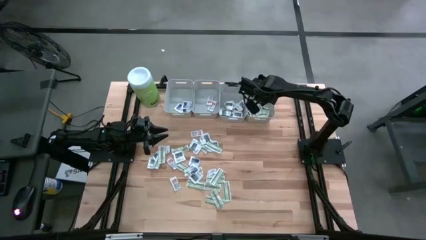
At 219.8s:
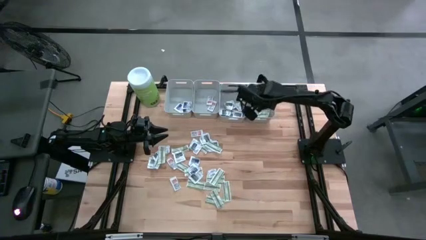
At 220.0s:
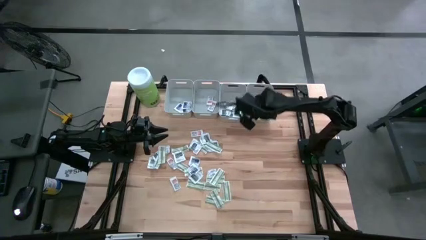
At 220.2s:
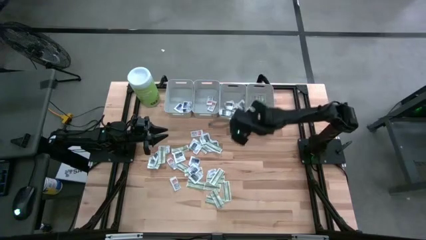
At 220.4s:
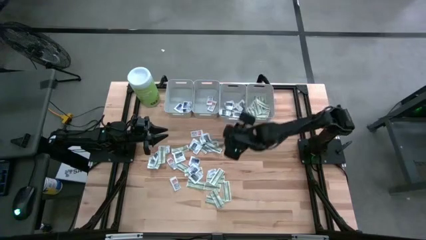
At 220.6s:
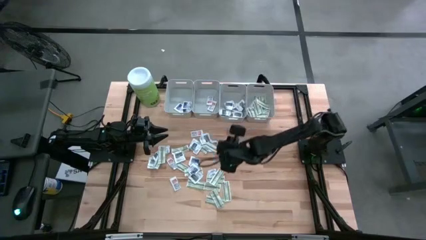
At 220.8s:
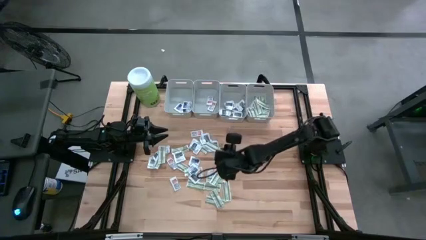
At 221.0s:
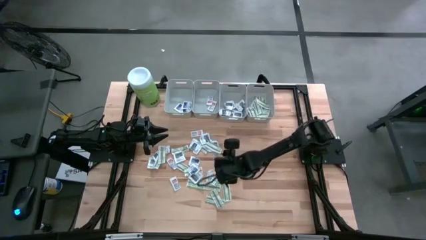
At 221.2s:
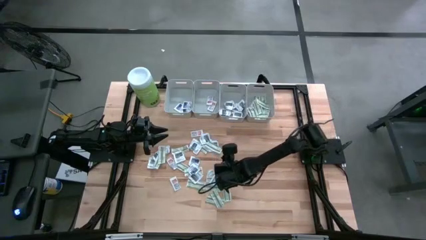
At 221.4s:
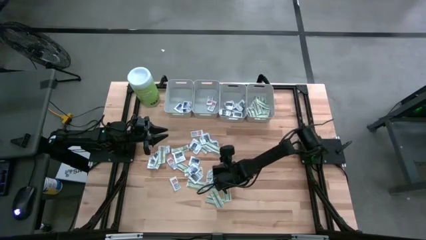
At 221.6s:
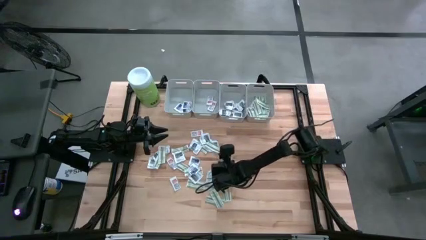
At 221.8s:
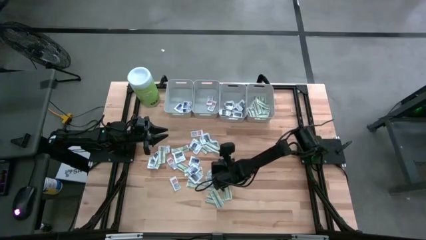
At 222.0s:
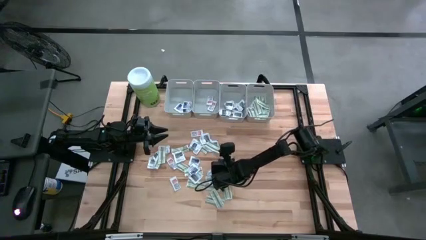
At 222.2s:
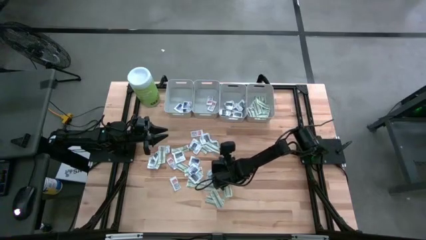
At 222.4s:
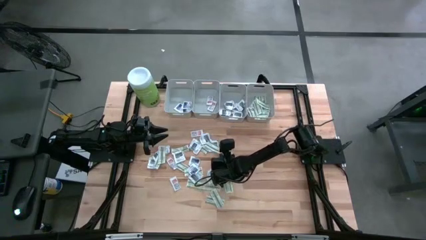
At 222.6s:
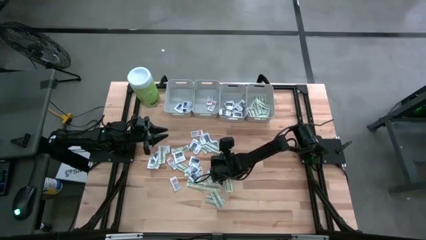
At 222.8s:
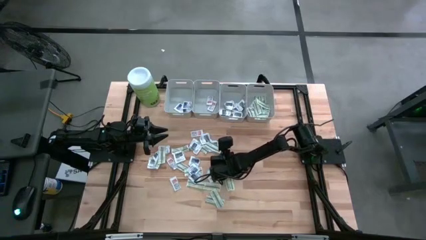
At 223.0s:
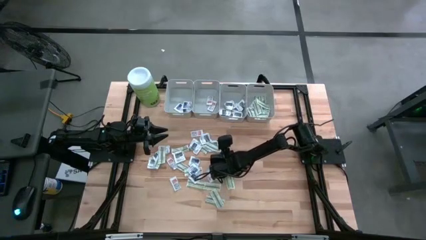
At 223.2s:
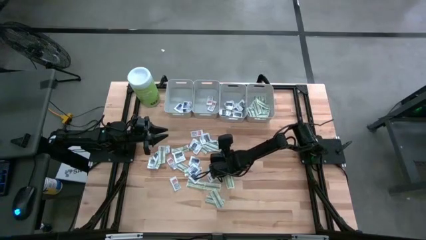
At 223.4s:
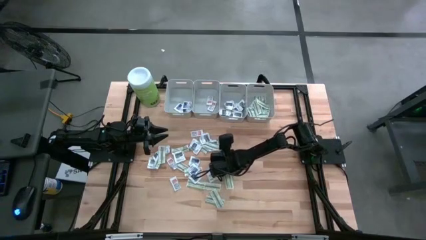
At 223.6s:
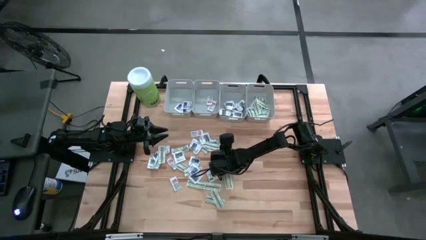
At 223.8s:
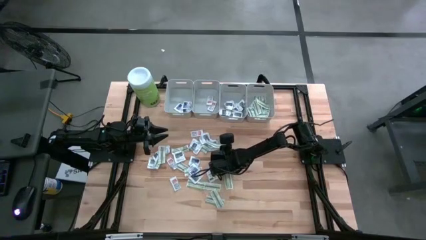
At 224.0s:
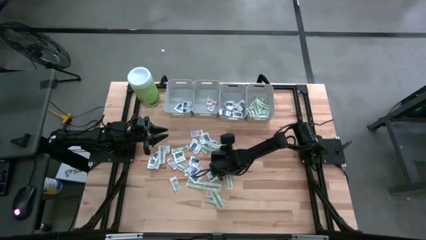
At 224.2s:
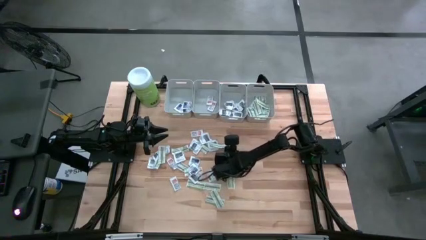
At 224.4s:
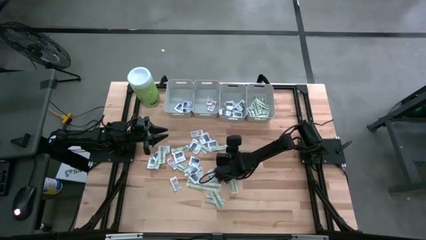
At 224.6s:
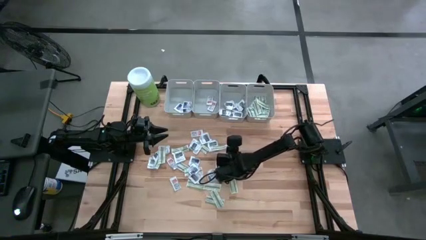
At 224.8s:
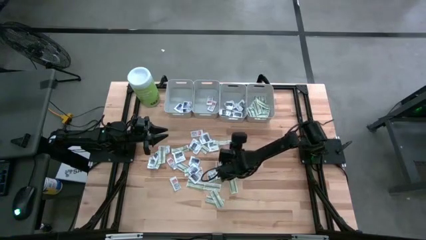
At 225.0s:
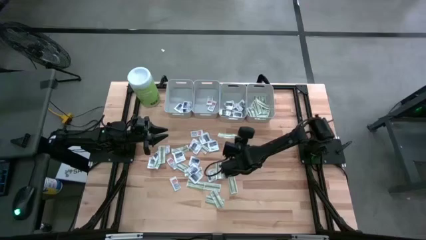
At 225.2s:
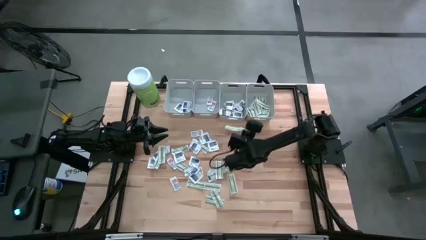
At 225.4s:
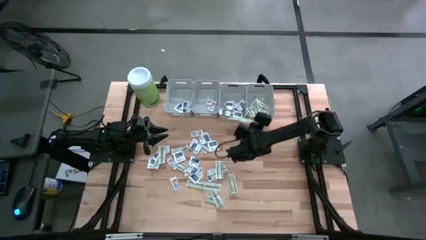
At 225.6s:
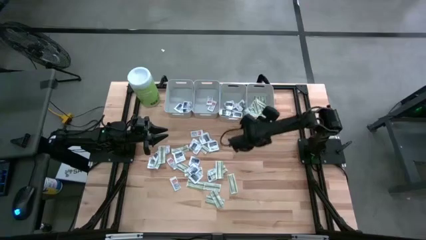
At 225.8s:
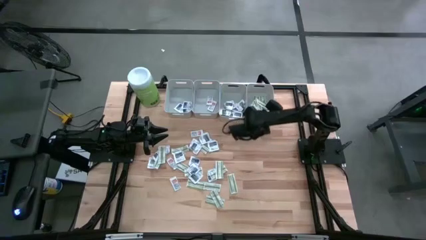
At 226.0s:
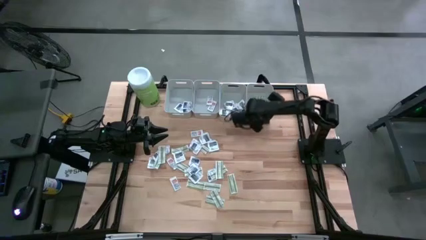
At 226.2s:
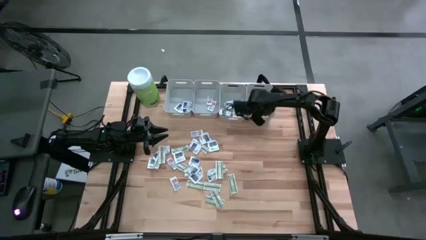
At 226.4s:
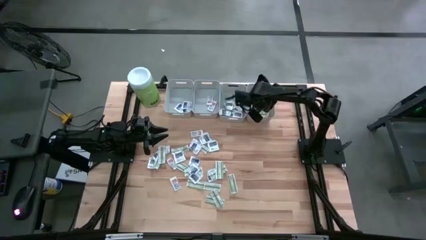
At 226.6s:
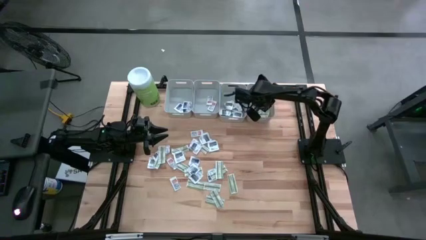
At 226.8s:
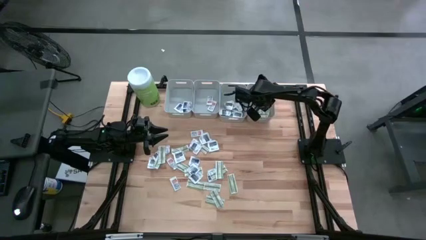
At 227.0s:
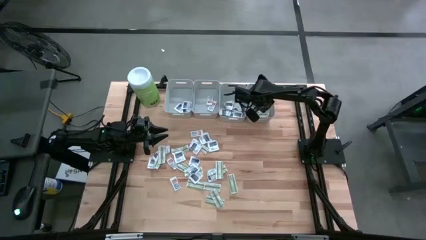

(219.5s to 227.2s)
Task: Pick & Place First Aid Supplies
Put the bandage into the right gray bin

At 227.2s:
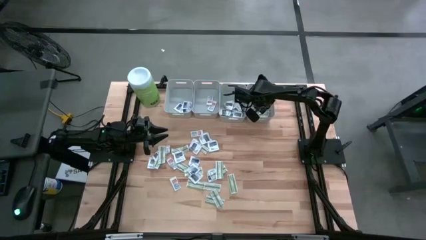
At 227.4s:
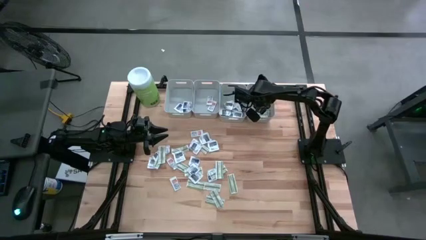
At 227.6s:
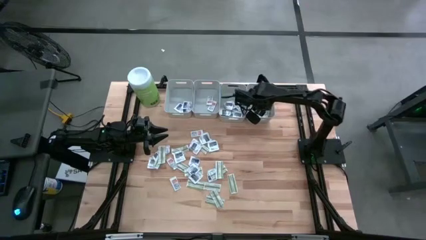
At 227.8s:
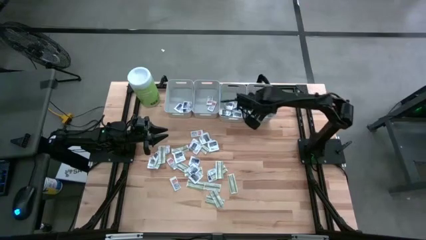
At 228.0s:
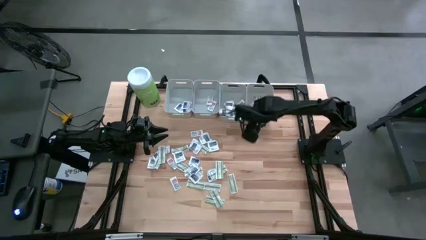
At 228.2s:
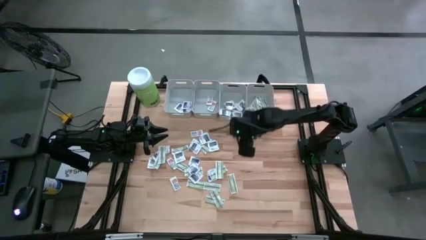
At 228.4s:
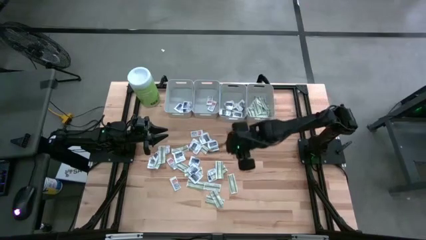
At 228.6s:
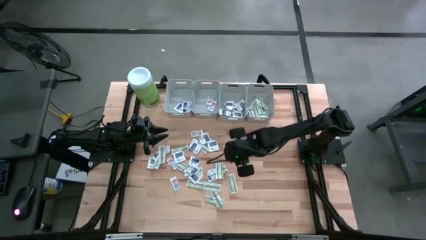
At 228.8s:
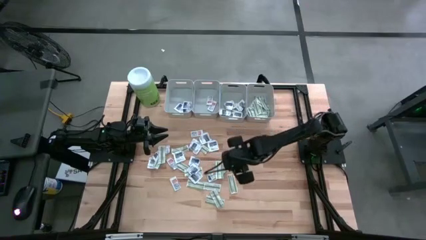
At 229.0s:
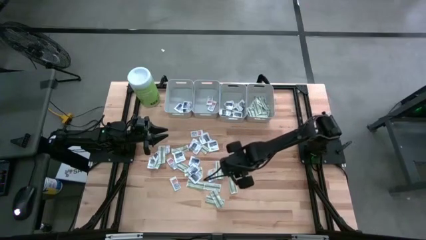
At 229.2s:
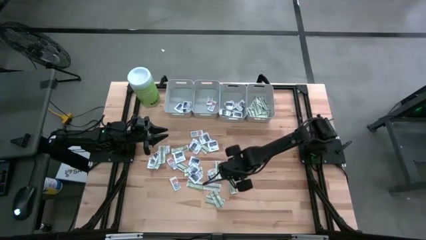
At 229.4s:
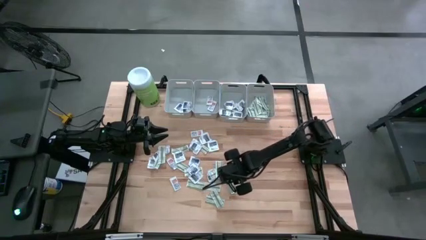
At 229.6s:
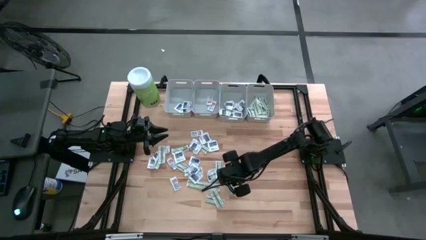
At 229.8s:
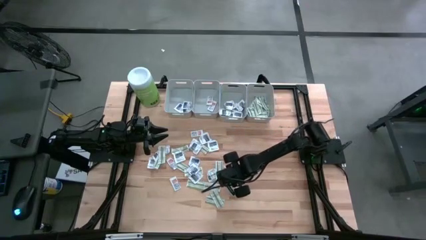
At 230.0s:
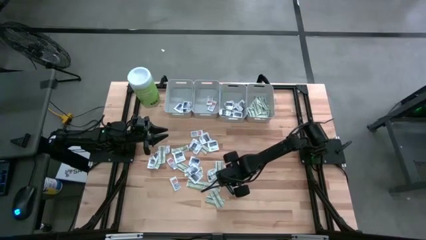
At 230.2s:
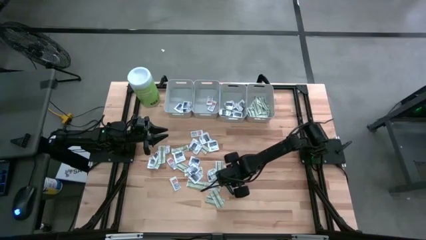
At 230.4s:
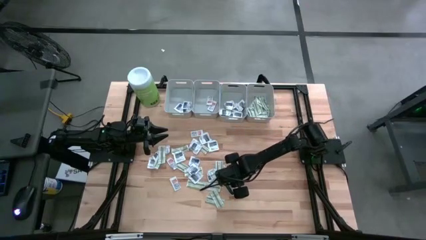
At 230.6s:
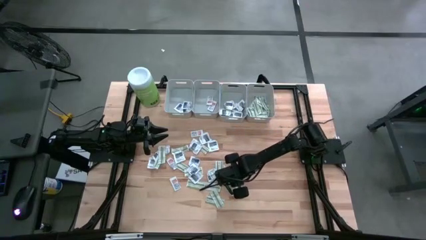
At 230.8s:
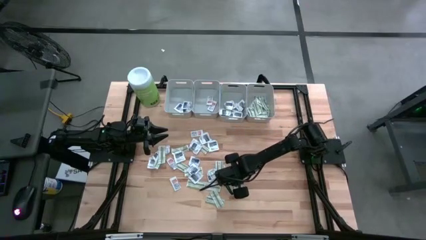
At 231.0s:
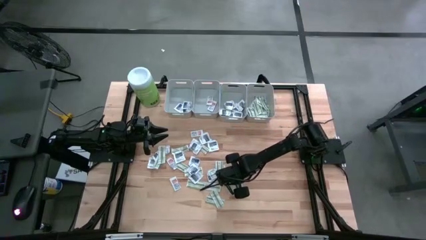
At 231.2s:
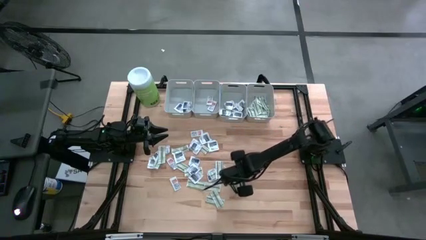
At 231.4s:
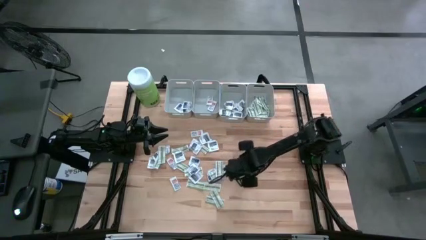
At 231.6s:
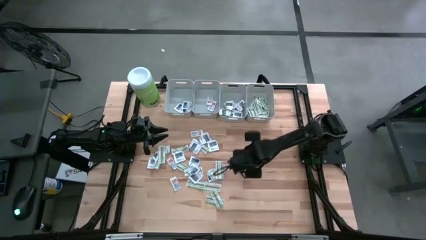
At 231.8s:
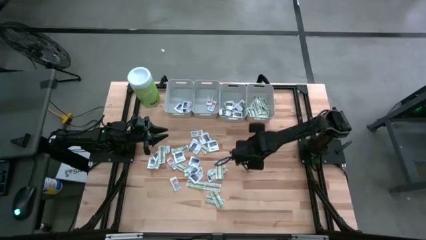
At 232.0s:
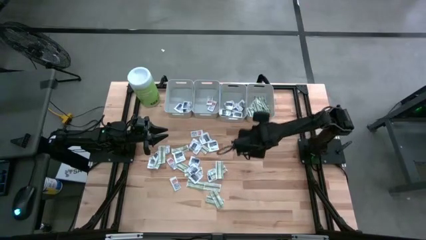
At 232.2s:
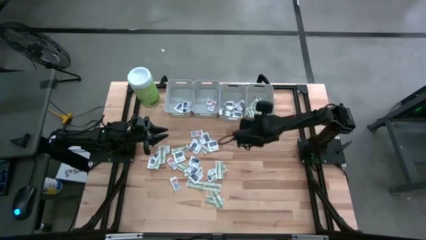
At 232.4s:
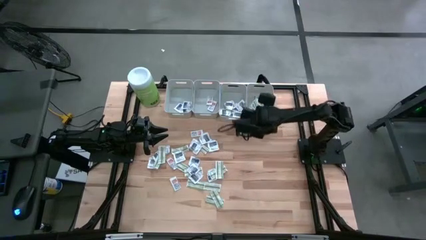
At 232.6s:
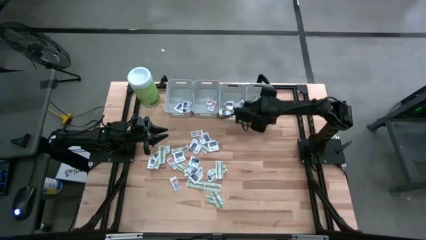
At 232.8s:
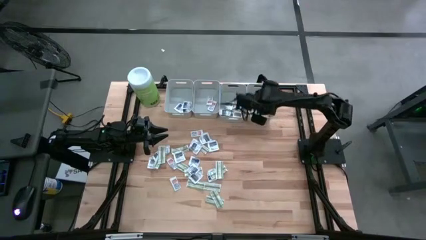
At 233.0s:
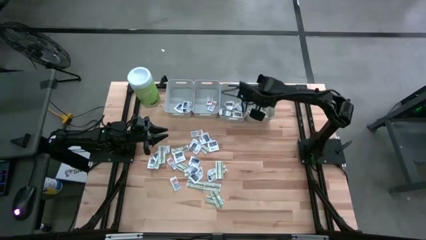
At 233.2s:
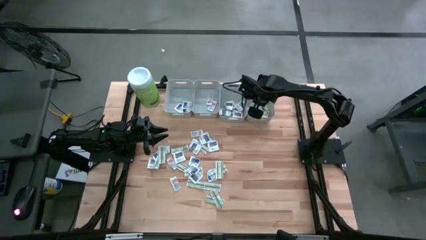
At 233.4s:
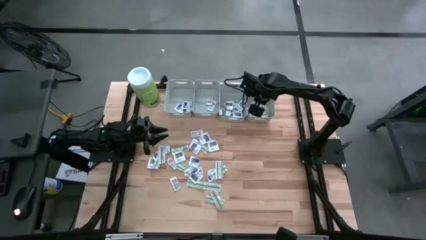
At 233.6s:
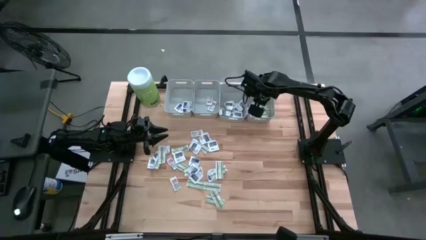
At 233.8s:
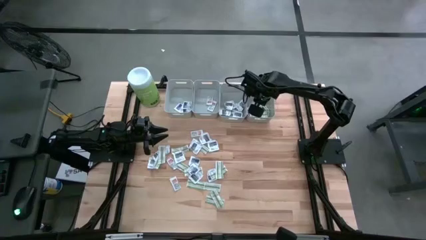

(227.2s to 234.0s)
Put the bandage into the right gray bin

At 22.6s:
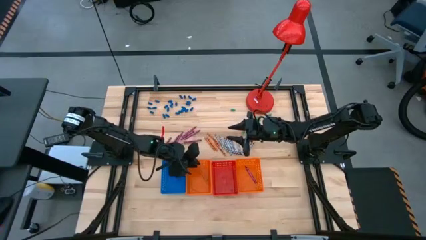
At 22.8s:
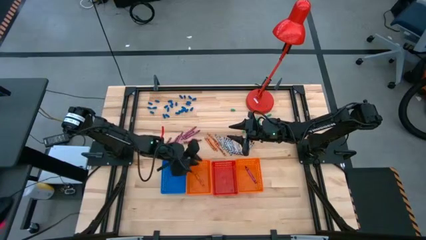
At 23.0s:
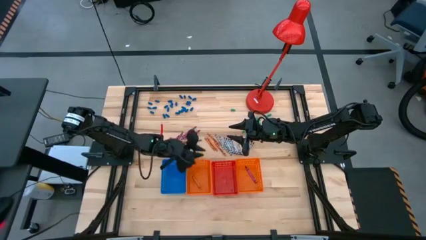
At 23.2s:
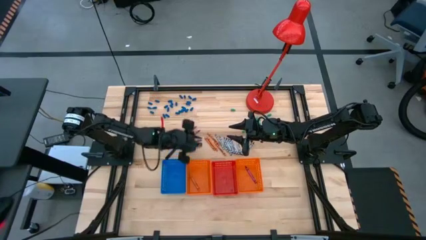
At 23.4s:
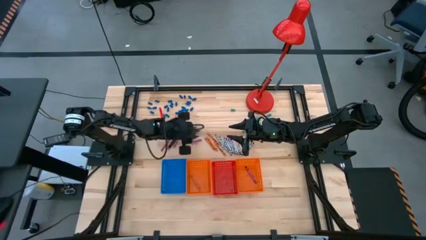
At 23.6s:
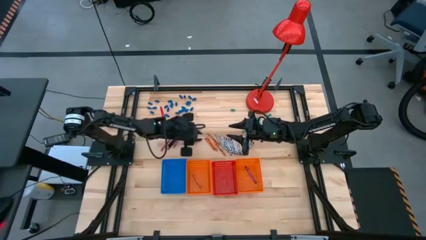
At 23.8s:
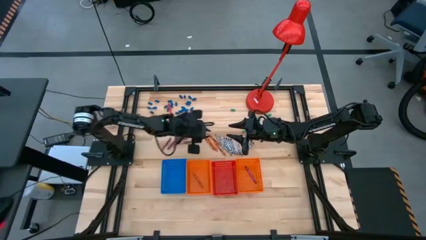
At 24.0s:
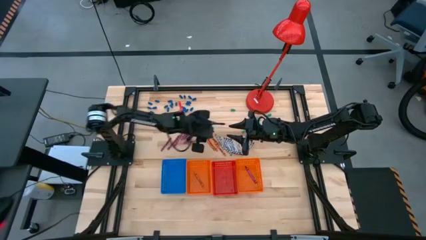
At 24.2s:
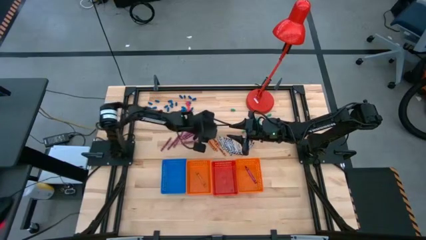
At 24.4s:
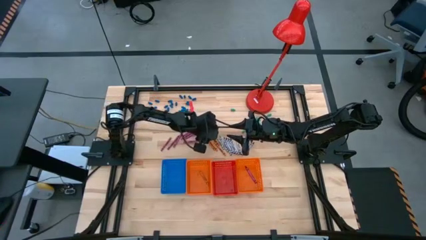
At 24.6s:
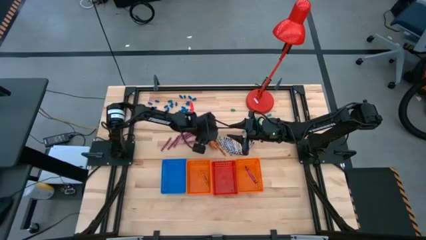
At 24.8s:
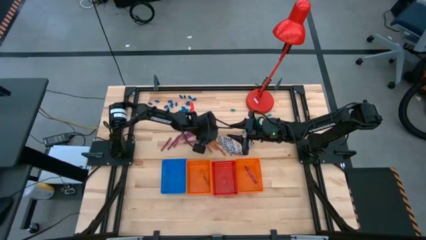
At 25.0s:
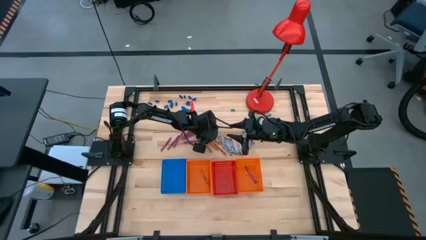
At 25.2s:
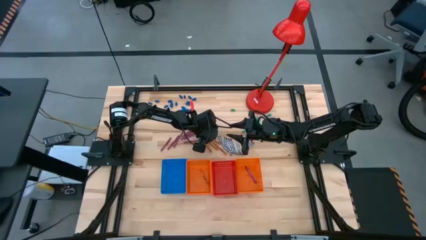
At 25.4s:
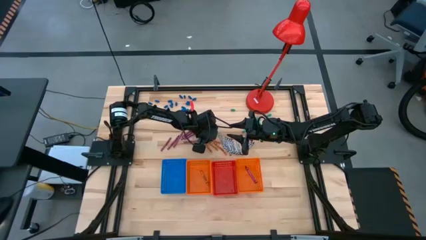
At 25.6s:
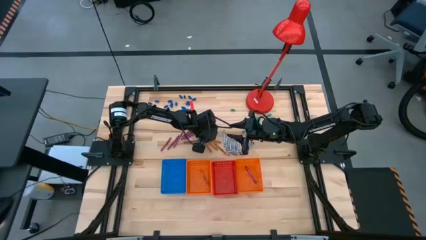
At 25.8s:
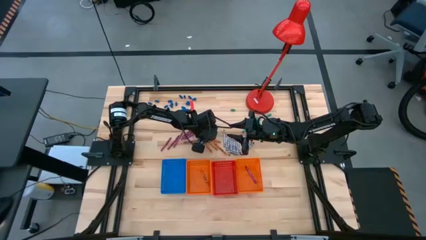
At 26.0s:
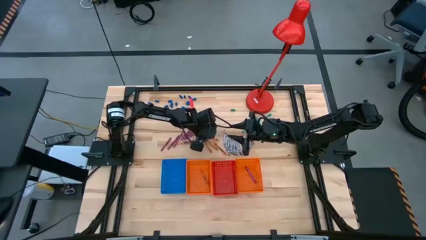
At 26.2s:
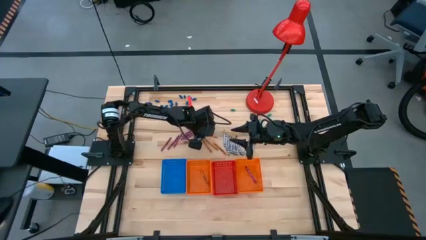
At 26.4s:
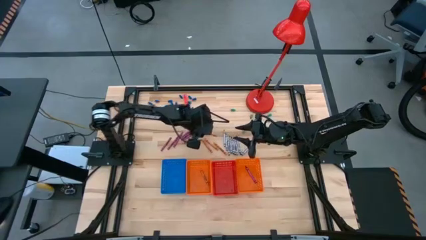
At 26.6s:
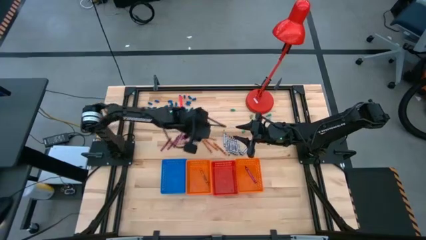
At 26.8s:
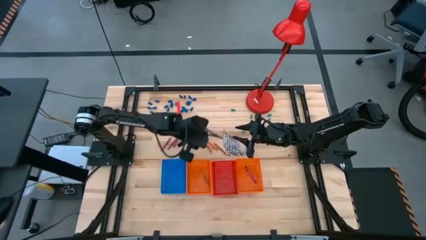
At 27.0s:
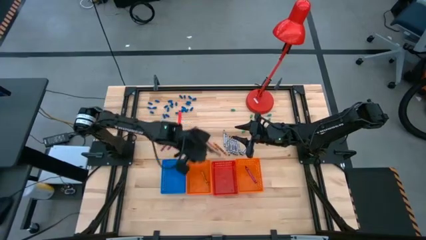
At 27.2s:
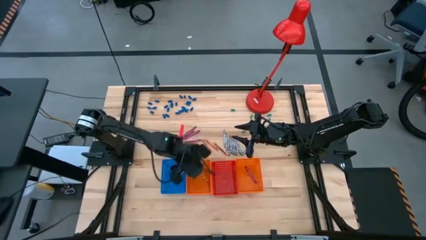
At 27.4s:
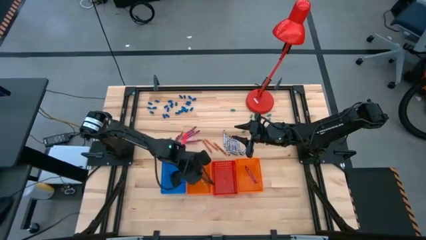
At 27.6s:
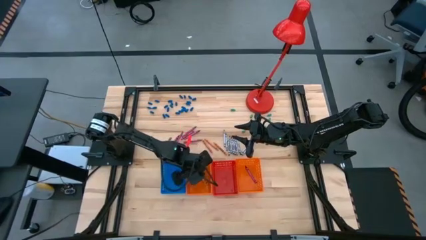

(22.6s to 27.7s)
Task: Sort crayons
Put the orange crayon into the left orange bin
